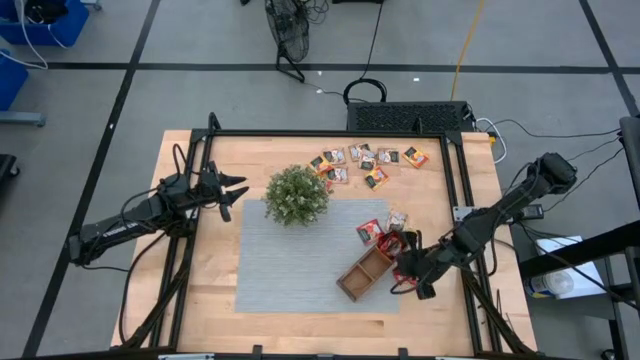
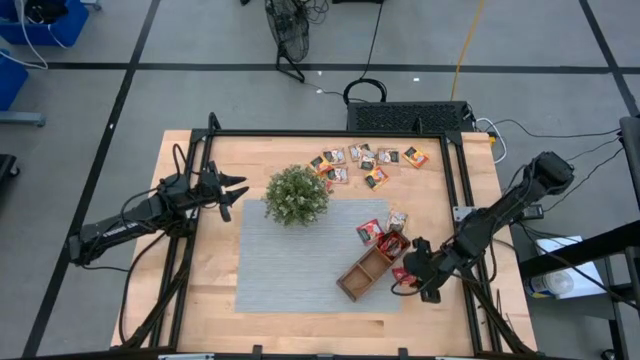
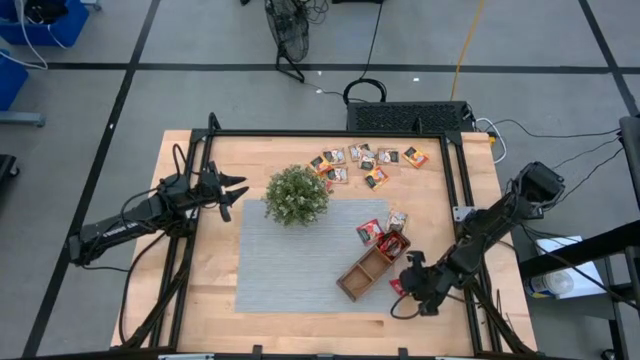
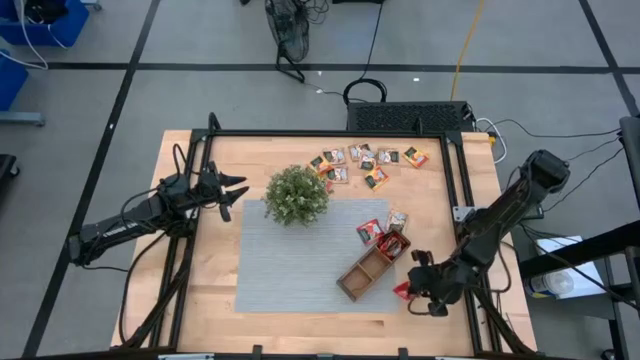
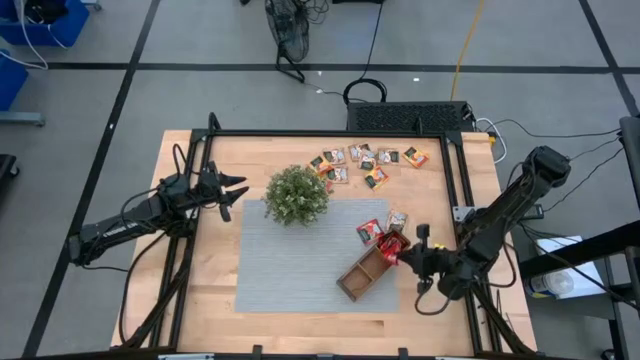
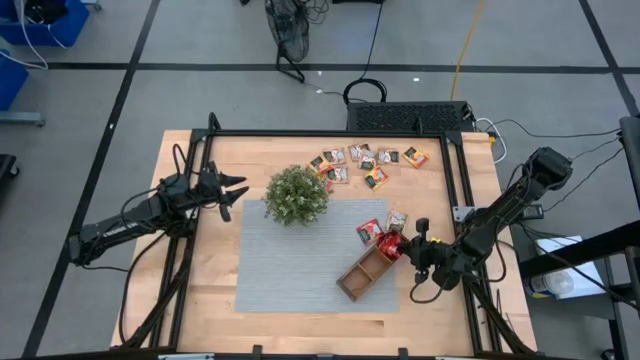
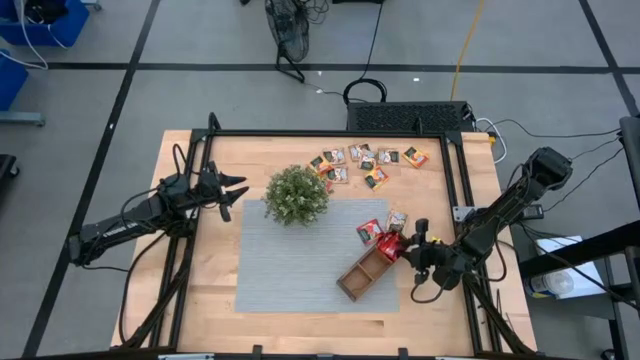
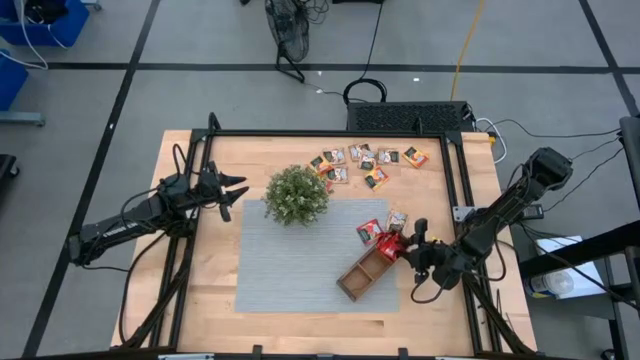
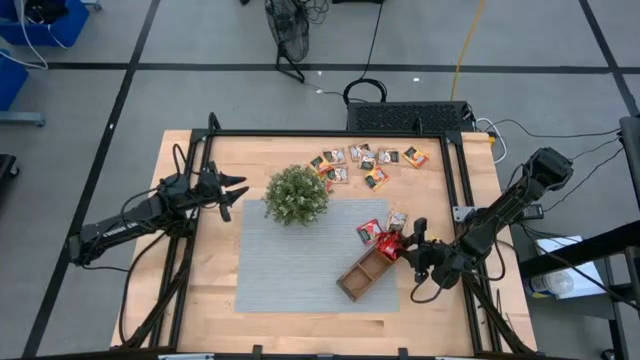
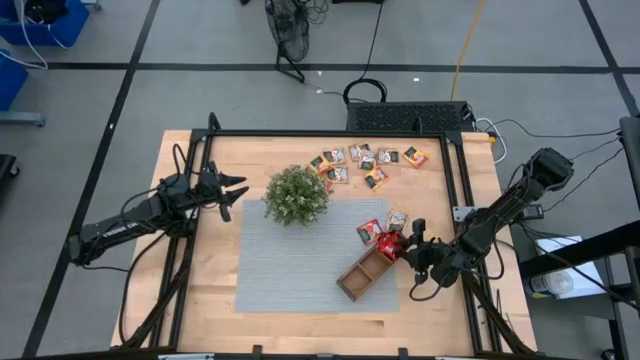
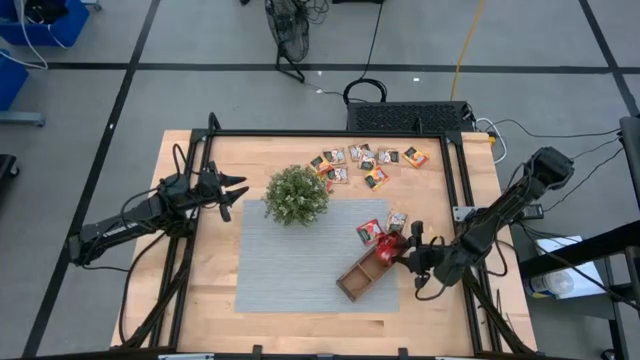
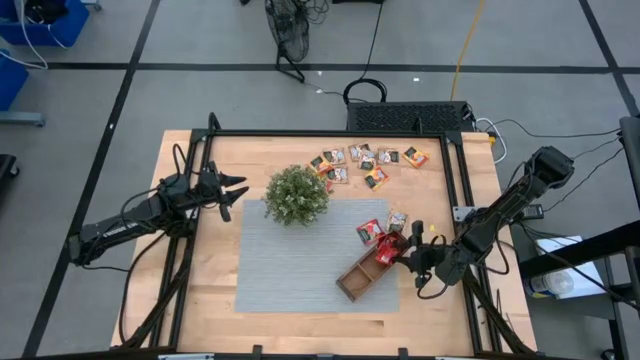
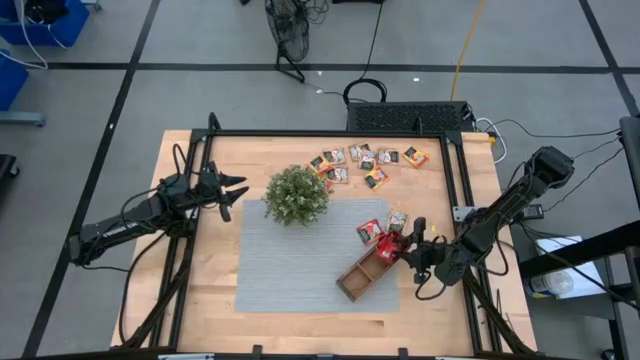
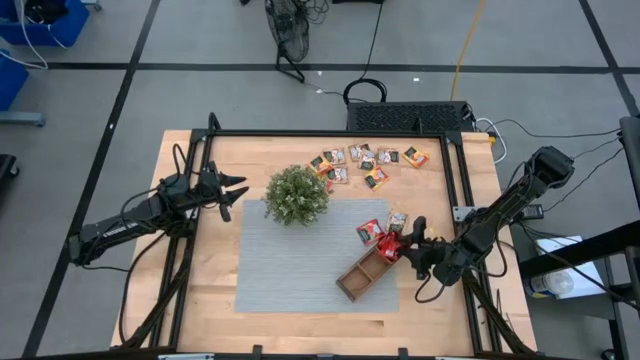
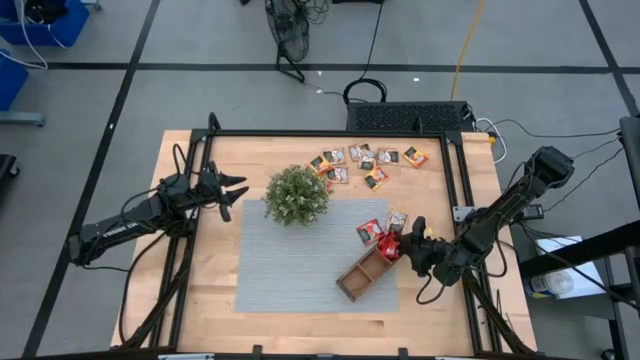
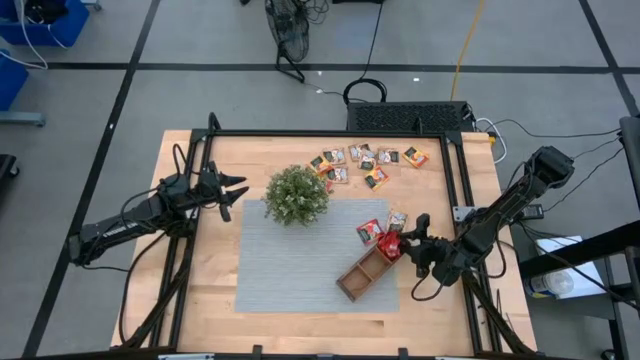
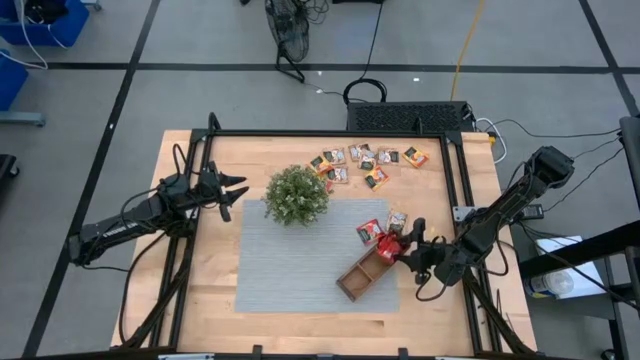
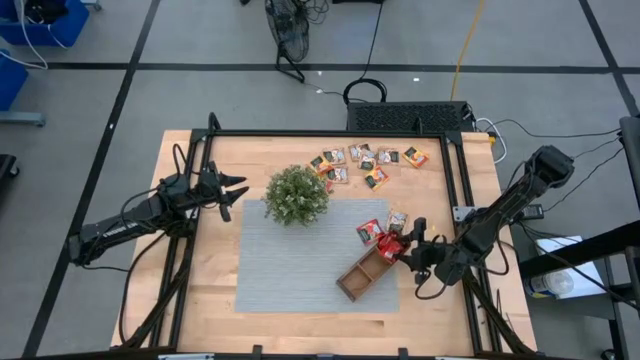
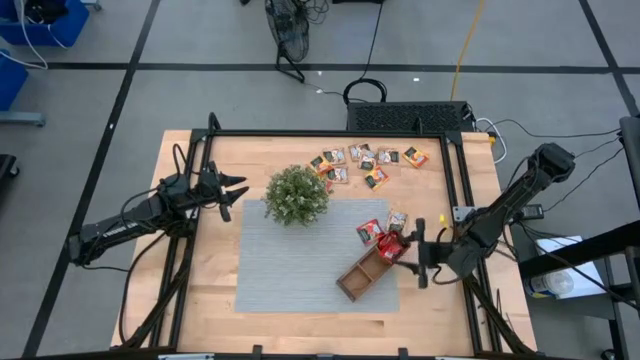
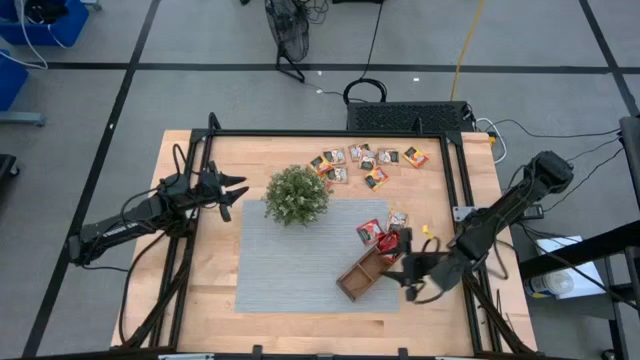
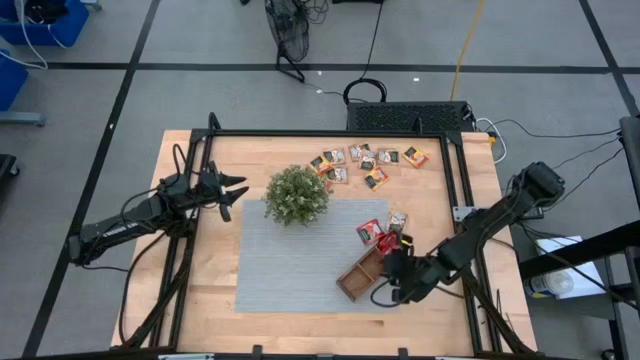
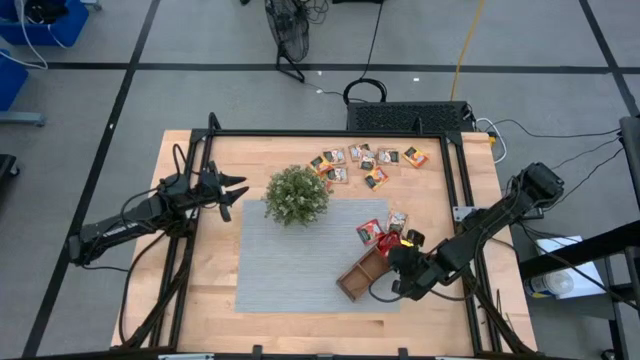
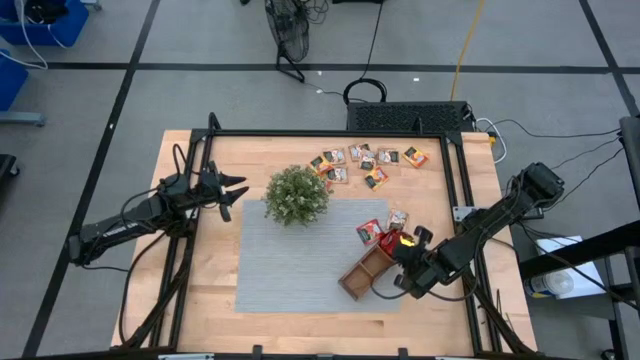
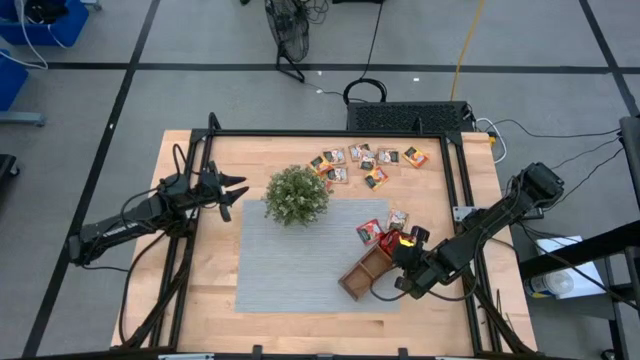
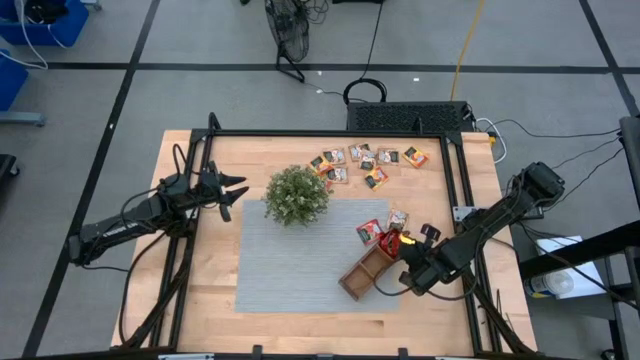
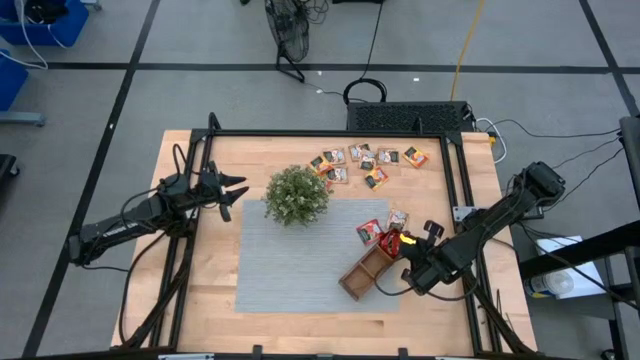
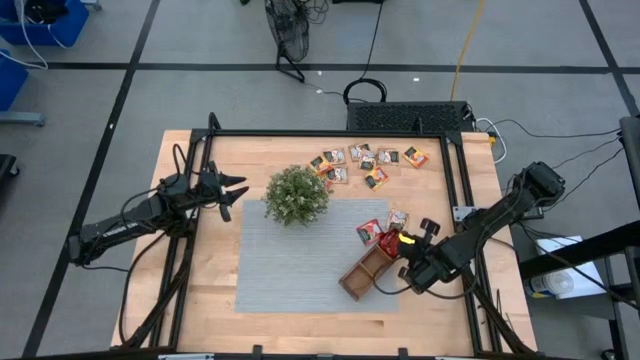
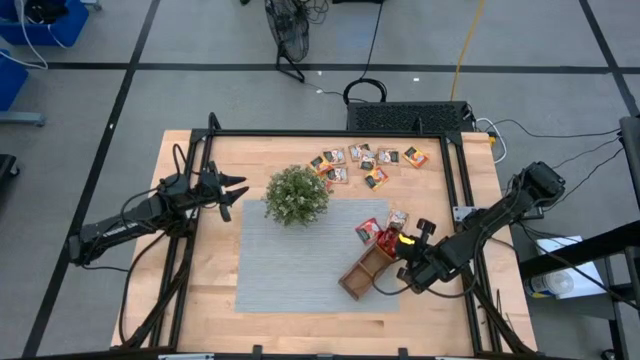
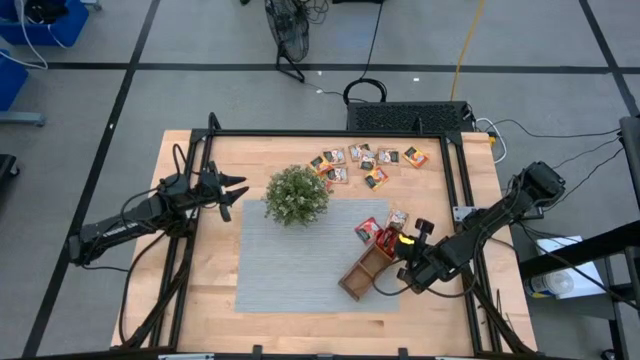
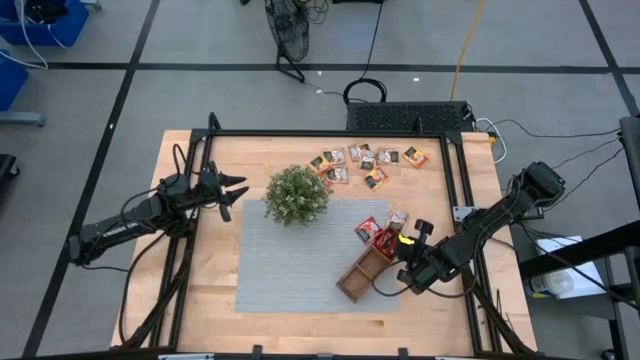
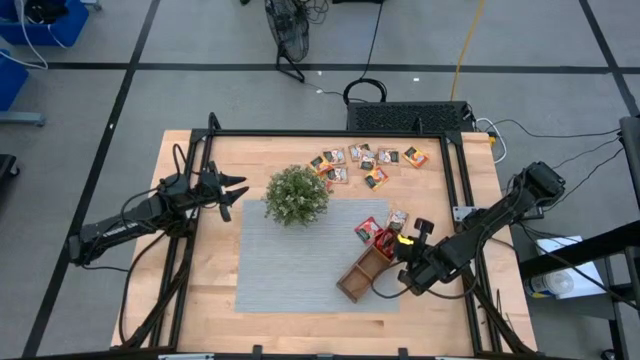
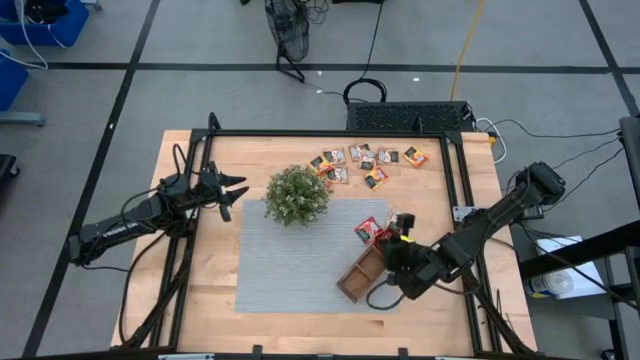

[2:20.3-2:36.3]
Task: Pick & Place Tea
Put the strawberry tea sachet into the brown organizer

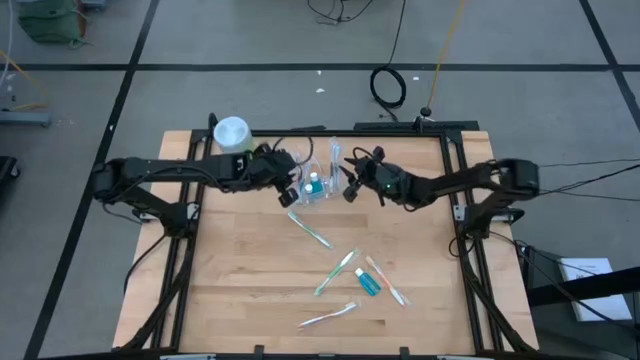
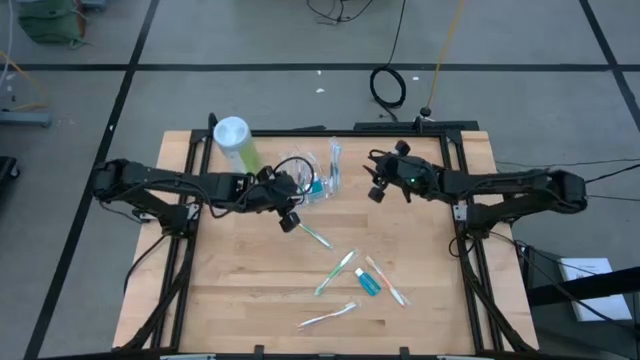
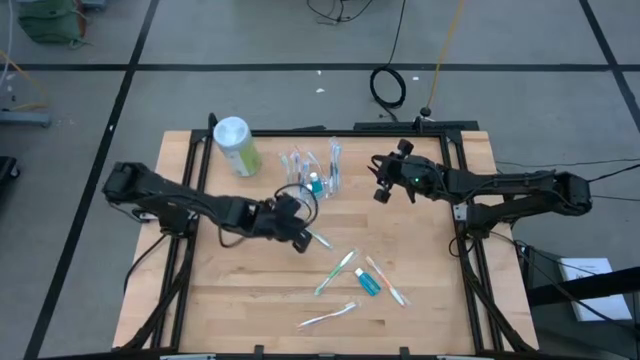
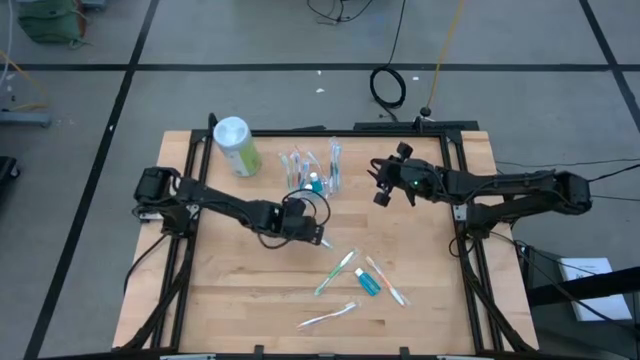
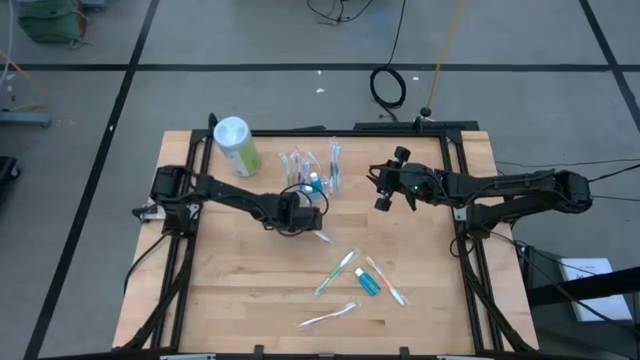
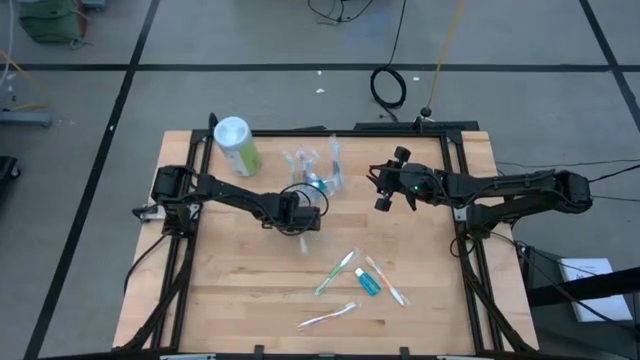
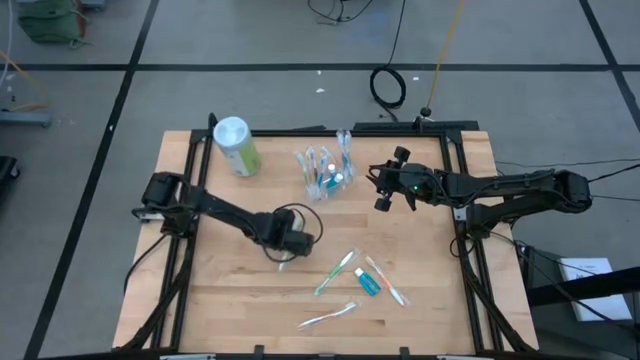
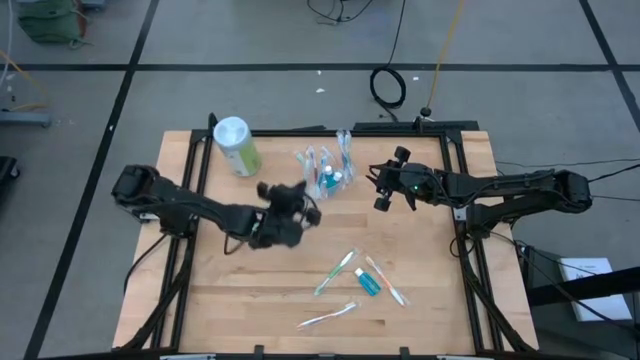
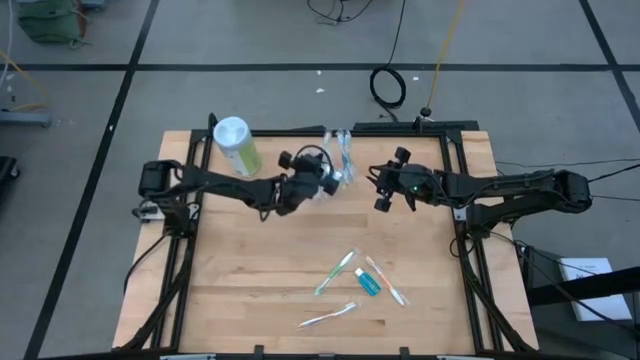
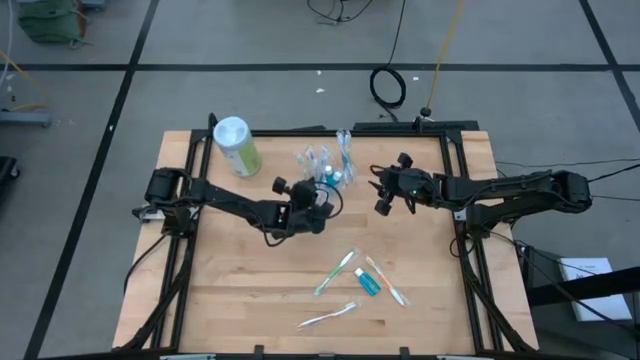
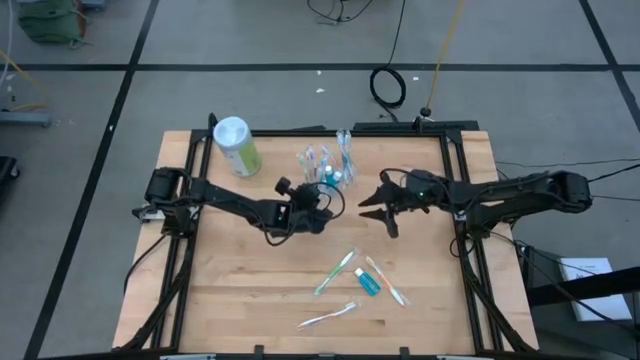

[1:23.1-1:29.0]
Task: Pick & Place toothbrushing station
Put the green toothbrush into the transparent organizer
